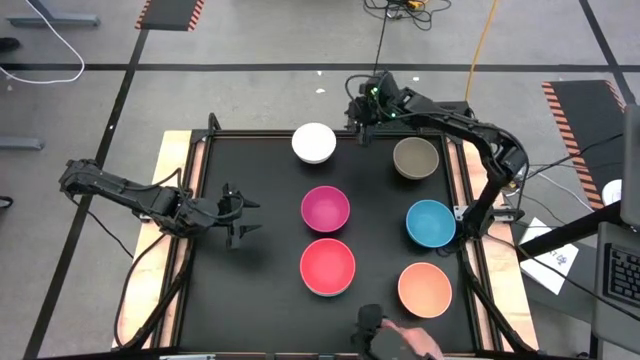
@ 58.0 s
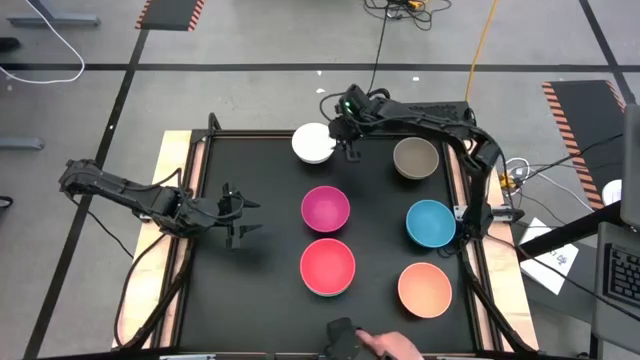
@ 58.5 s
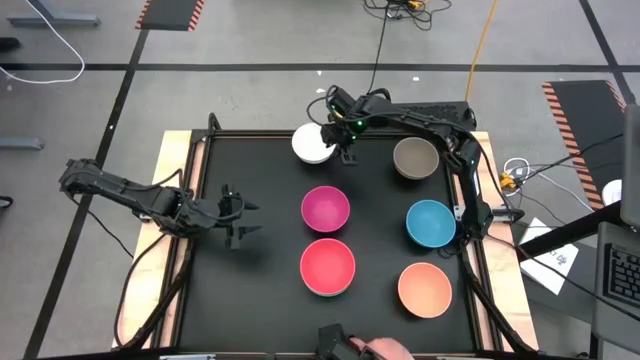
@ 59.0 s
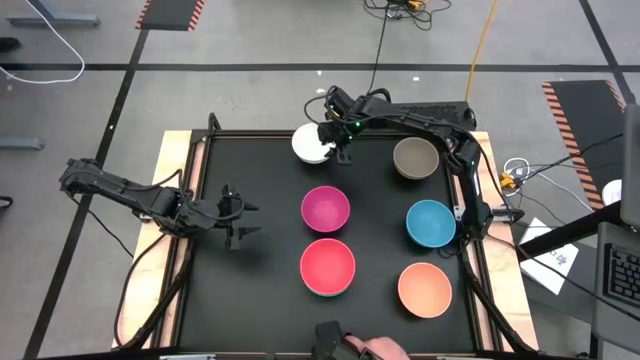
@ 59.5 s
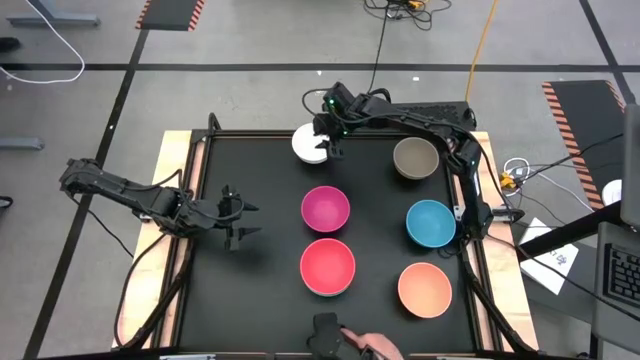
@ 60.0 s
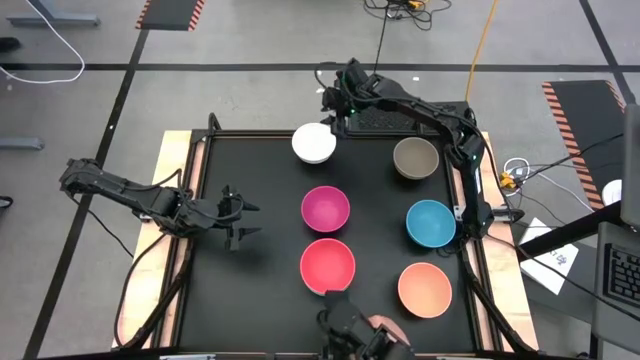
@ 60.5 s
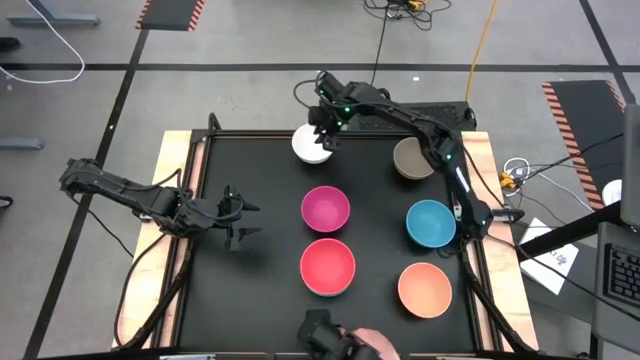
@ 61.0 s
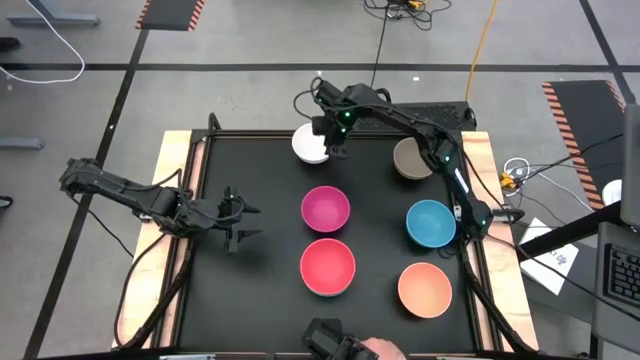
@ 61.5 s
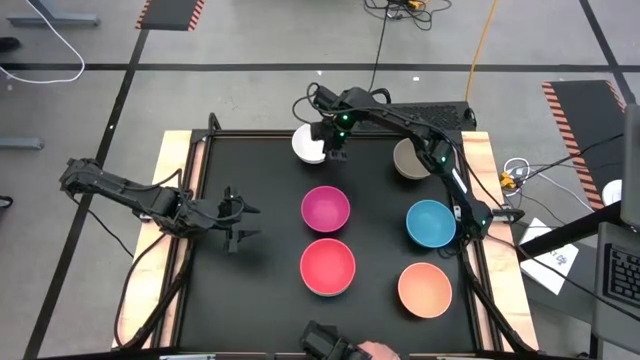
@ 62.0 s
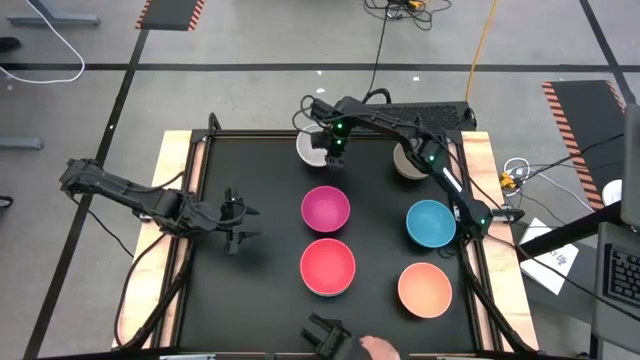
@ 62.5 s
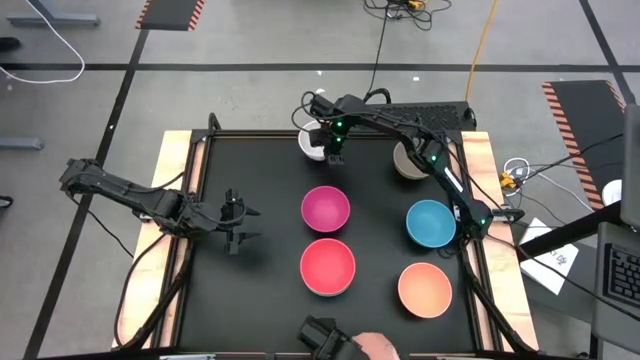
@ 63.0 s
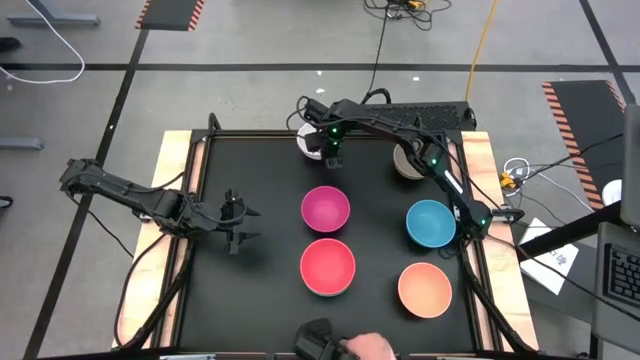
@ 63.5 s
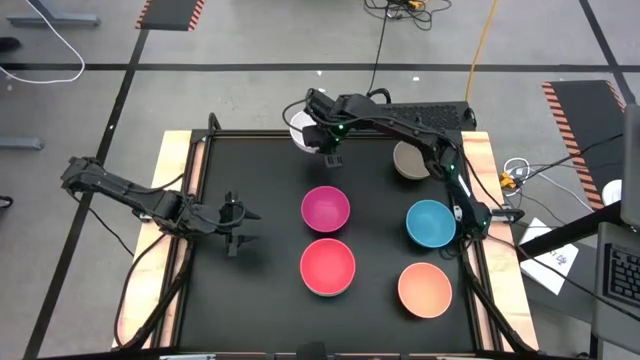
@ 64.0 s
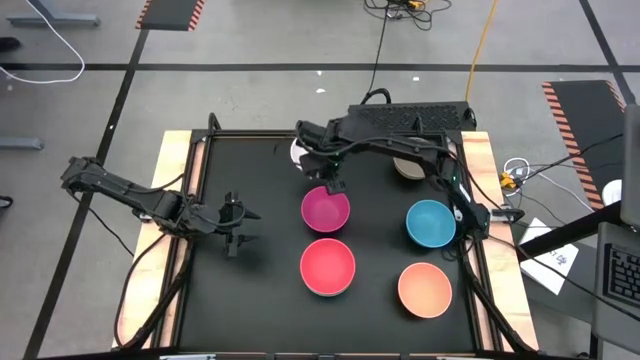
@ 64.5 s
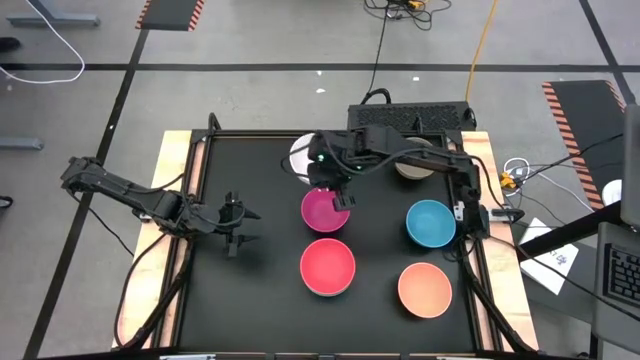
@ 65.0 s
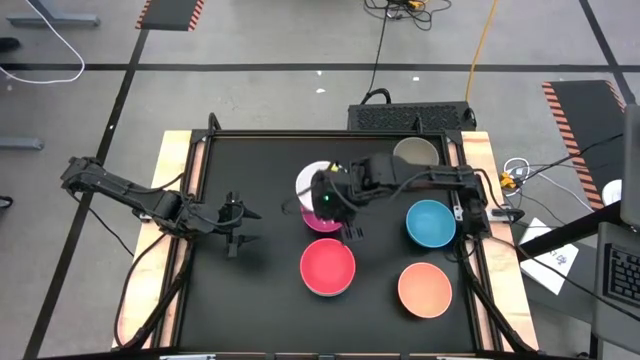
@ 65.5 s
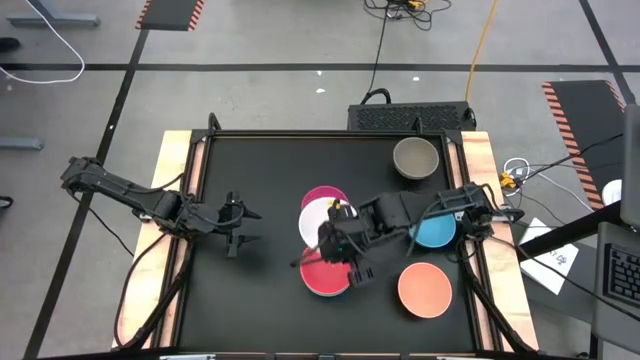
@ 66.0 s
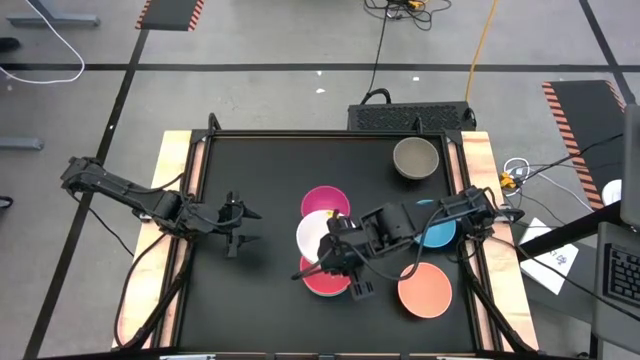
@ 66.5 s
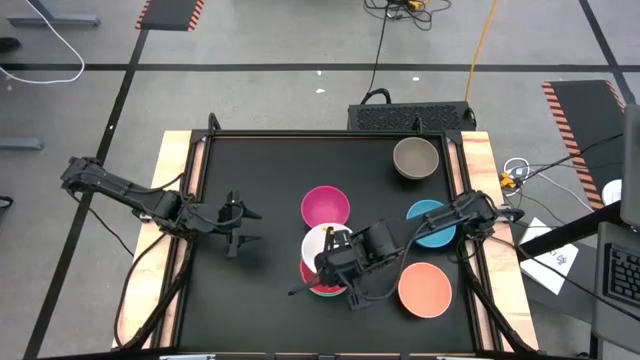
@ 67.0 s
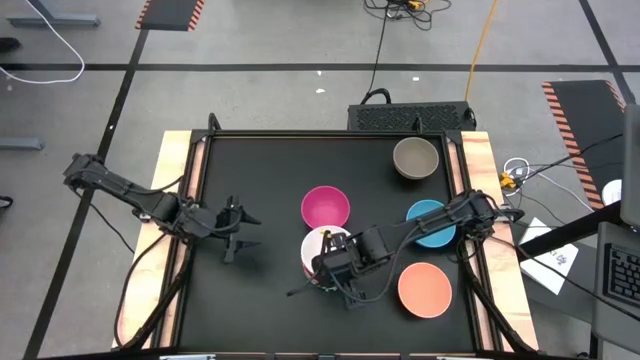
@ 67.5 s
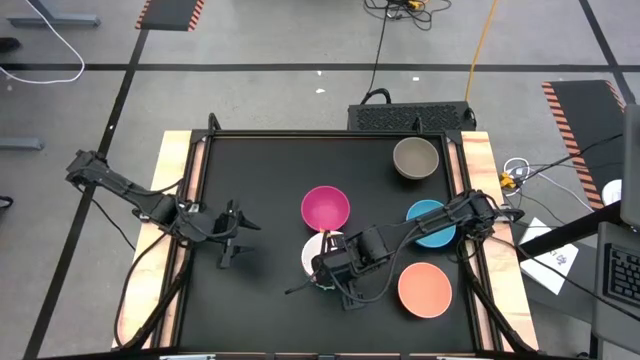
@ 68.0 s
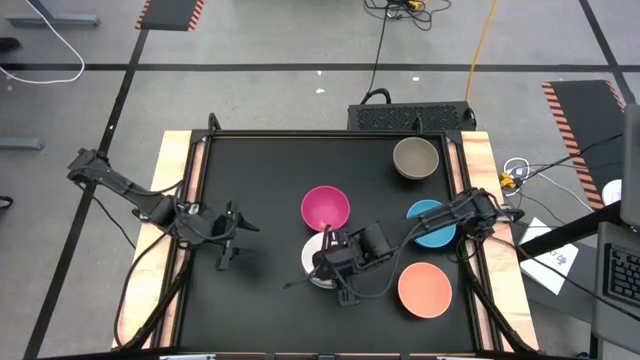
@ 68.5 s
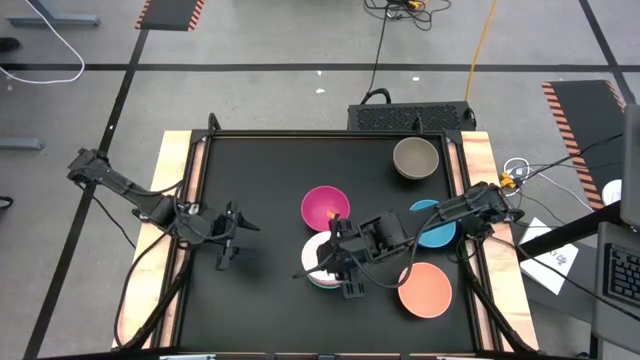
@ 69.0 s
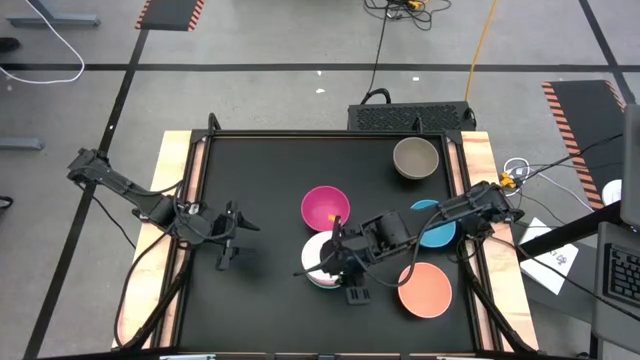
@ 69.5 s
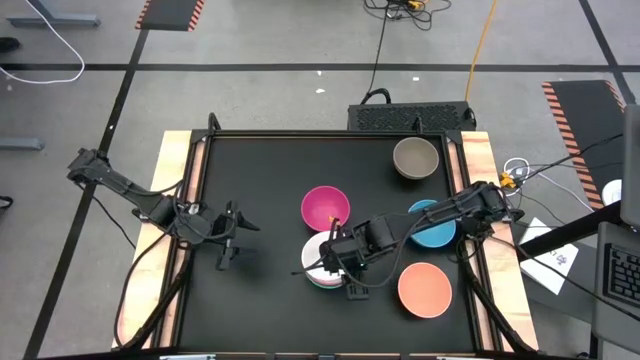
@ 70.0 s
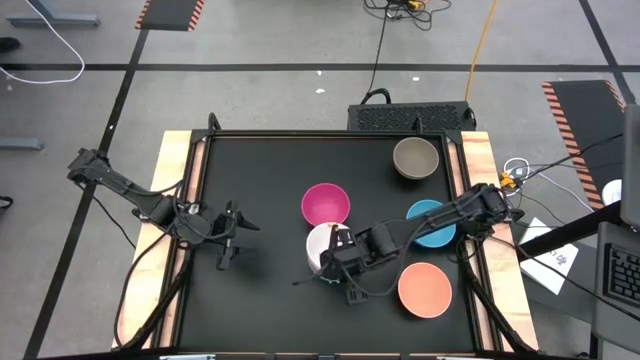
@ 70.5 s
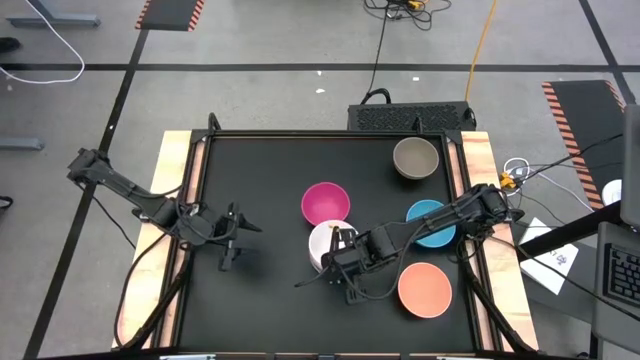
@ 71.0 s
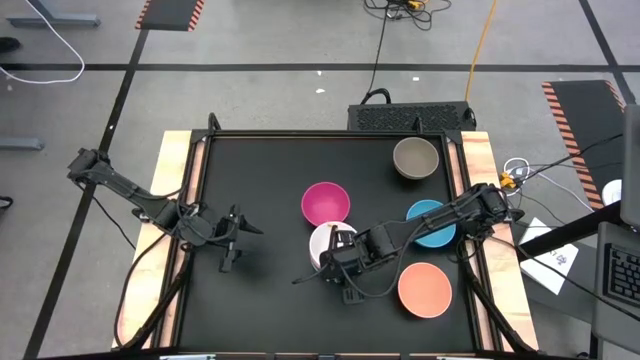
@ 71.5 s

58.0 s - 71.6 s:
Task: Nest bowls inside each other
Stack the white bowl on the orange bowl

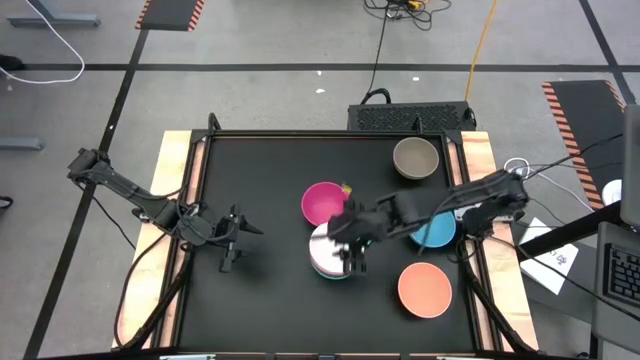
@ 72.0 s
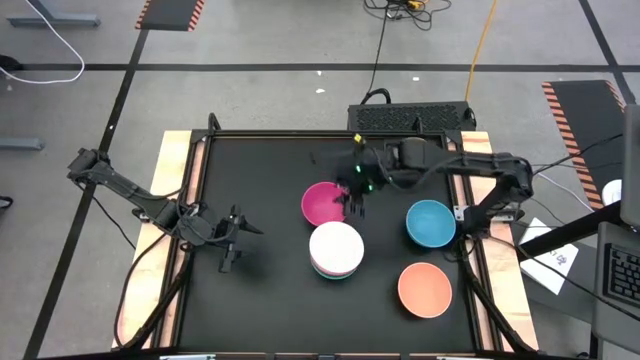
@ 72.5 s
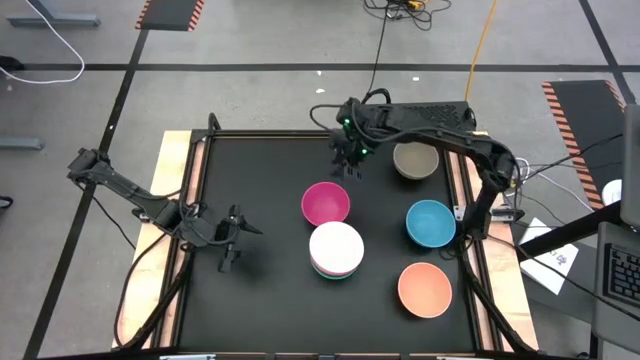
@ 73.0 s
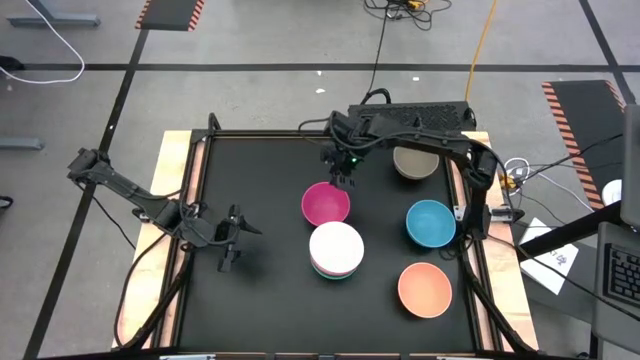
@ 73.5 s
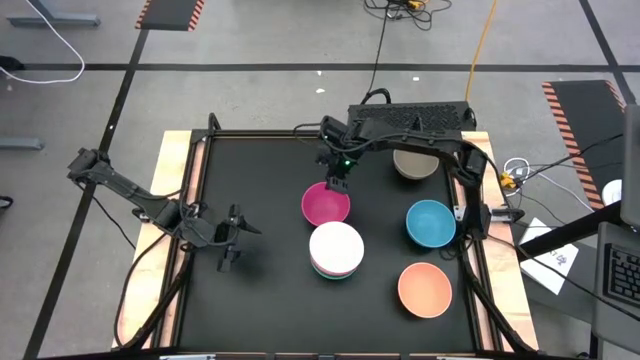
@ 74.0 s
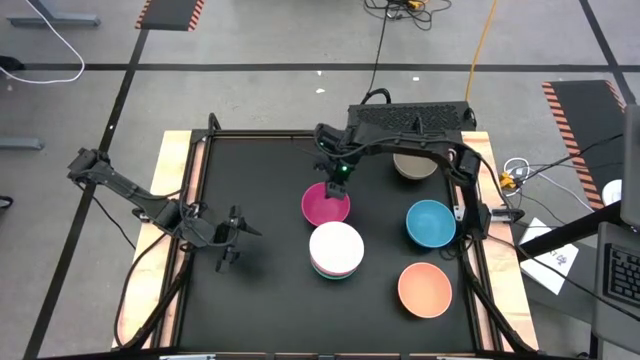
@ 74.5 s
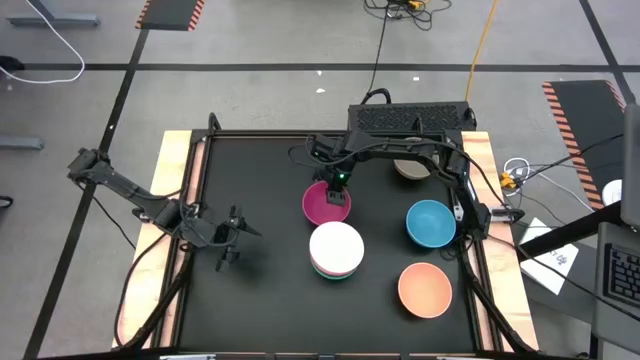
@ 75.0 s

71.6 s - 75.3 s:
Stack the pink bowl on the white bowl

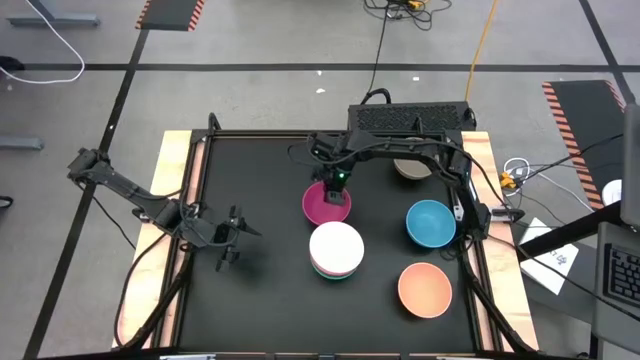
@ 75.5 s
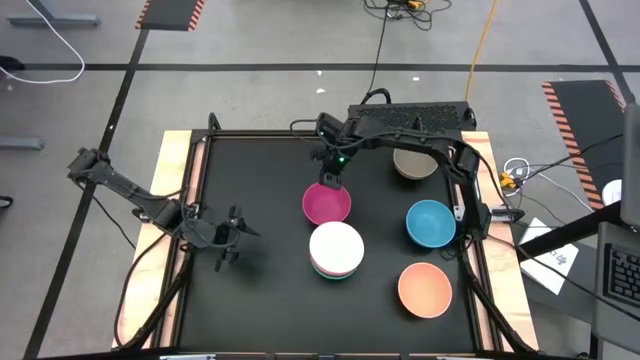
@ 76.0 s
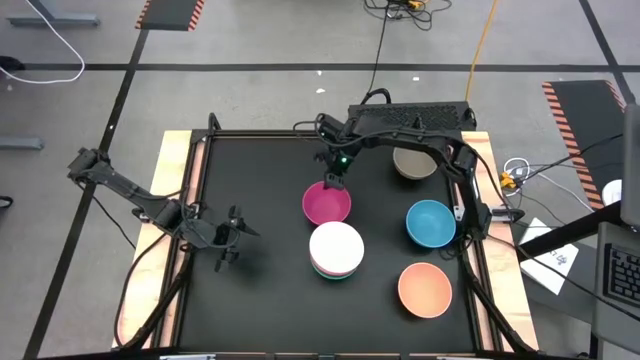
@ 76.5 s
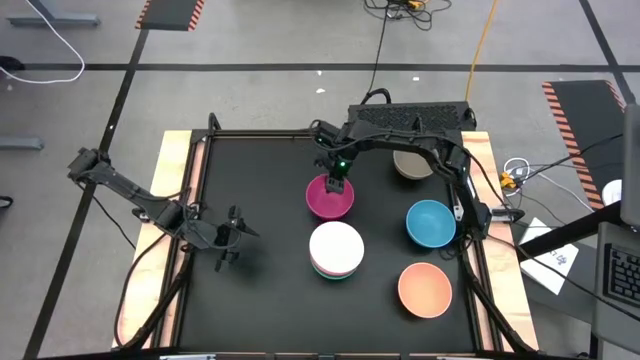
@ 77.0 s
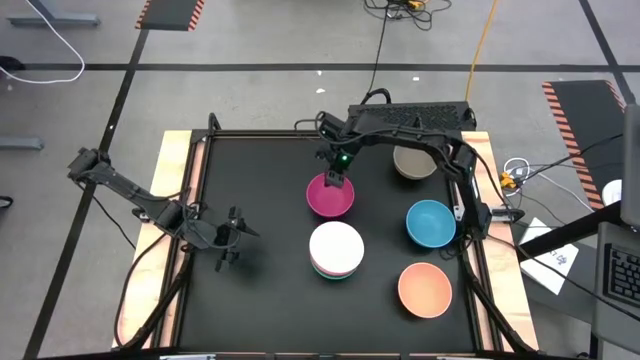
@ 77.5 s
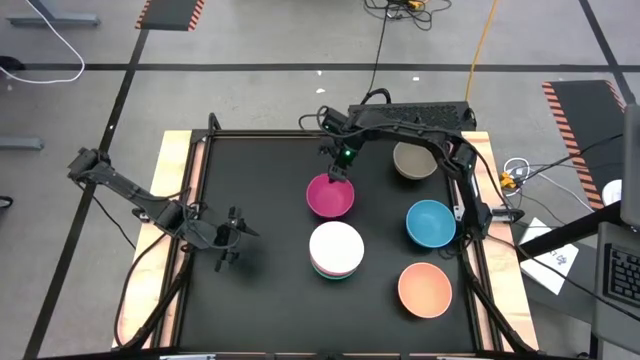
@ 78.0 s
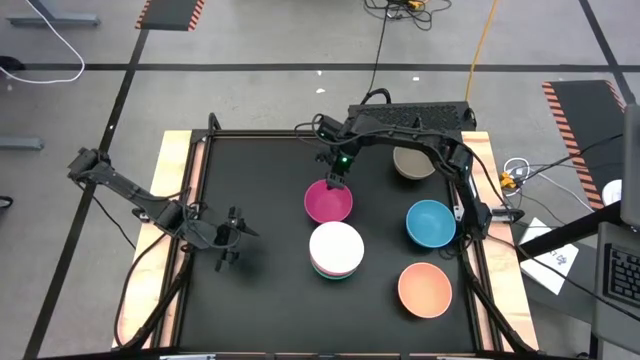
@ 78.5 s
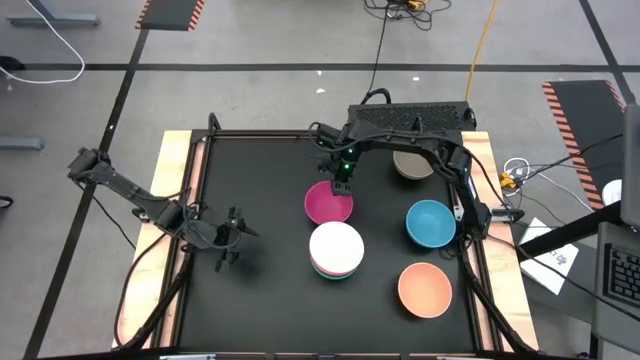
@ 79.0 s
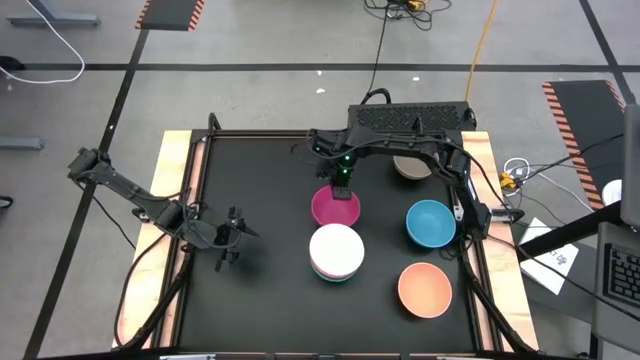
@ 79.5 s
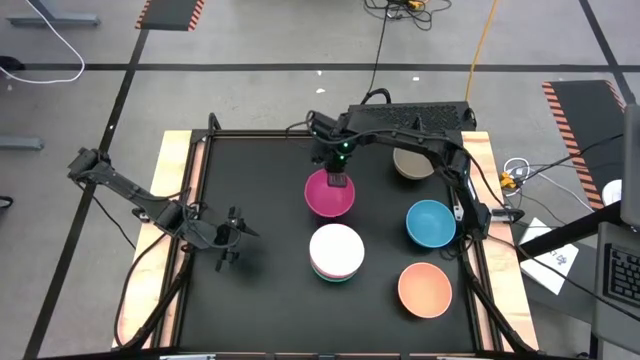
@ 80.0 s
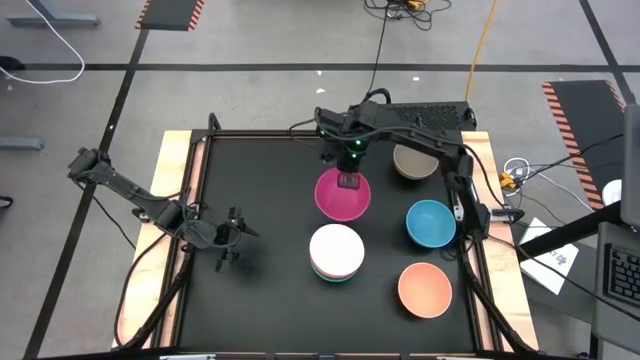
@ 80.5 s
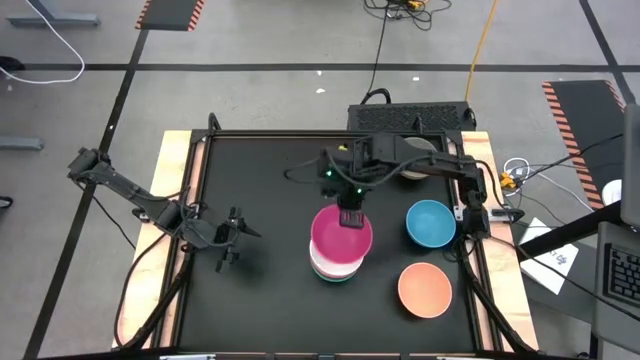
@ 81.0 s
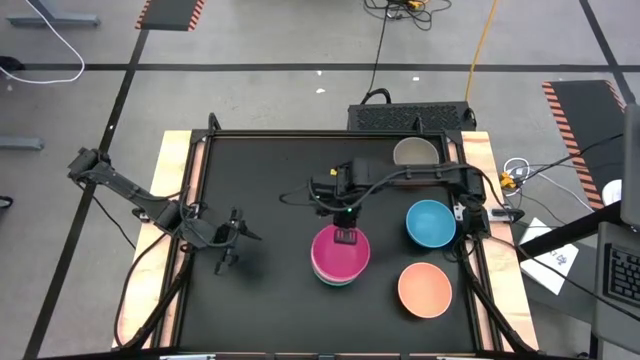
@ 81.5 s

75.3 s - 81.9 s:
Stack the pink bowl on the white bowl
